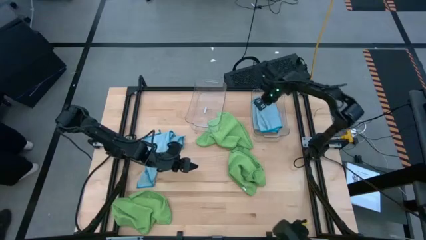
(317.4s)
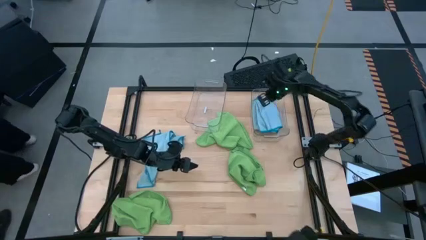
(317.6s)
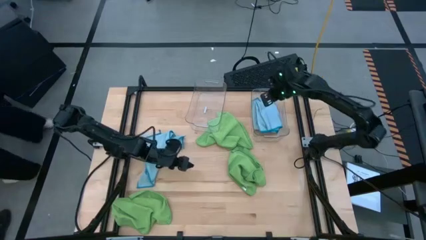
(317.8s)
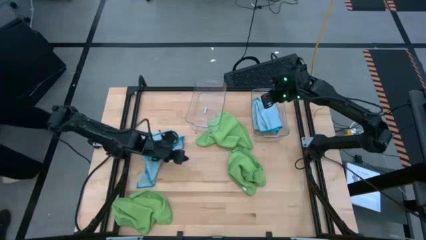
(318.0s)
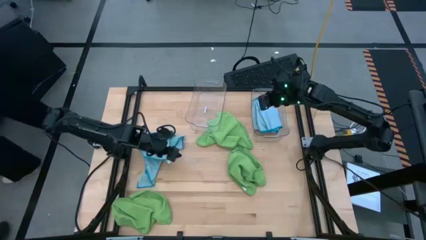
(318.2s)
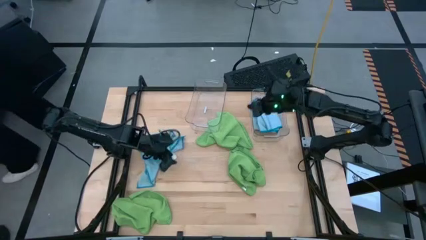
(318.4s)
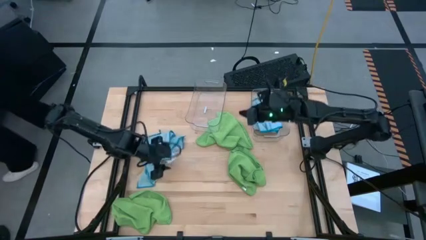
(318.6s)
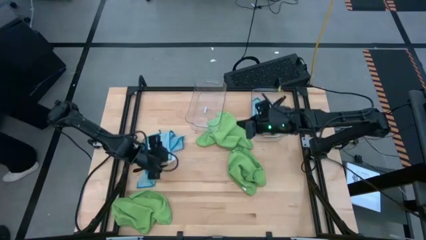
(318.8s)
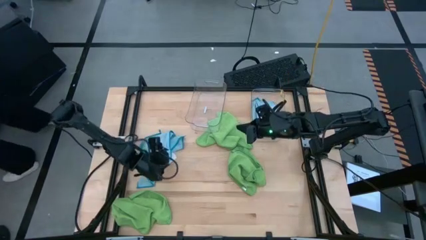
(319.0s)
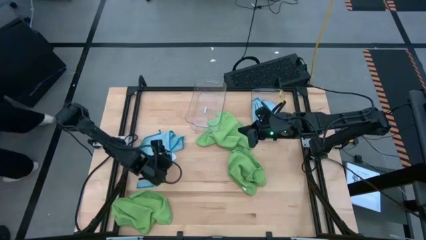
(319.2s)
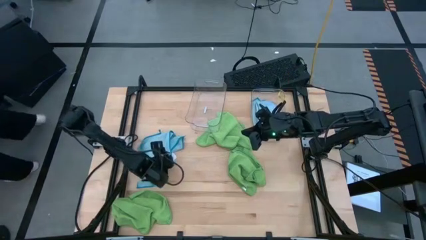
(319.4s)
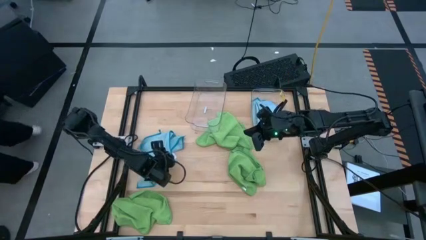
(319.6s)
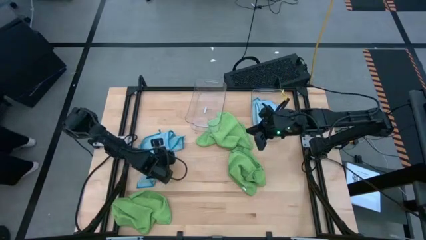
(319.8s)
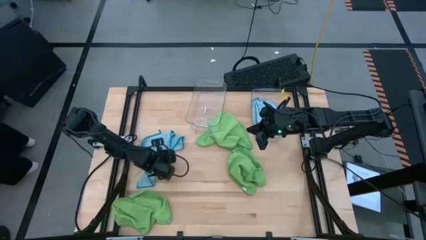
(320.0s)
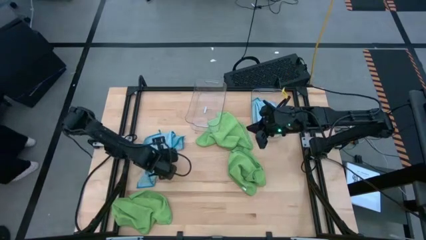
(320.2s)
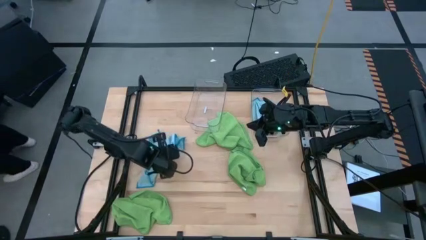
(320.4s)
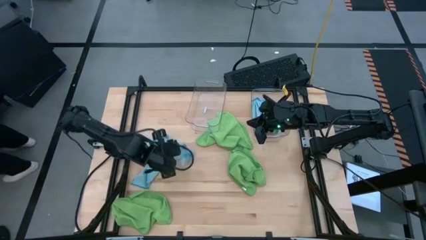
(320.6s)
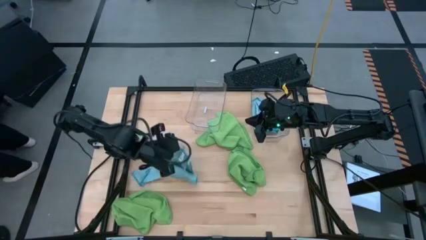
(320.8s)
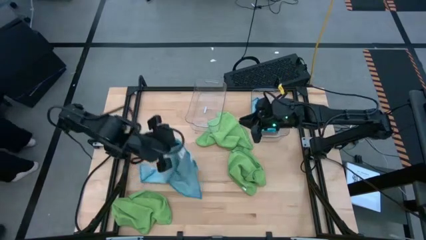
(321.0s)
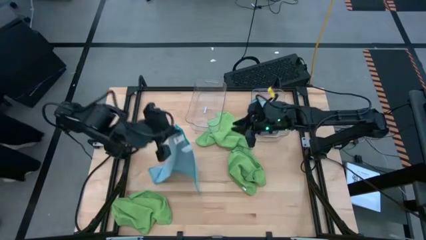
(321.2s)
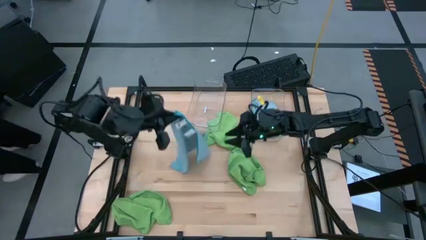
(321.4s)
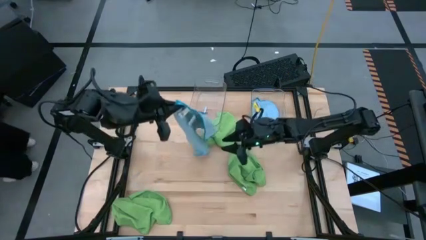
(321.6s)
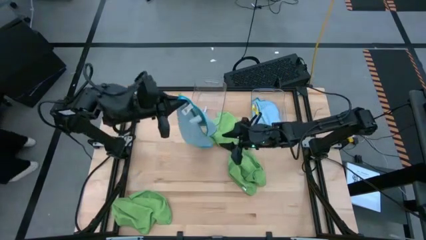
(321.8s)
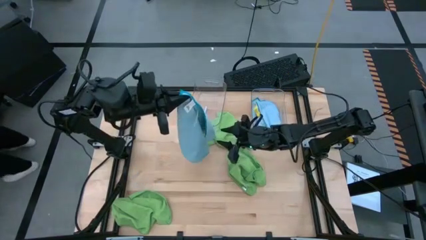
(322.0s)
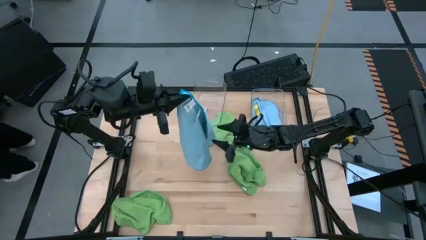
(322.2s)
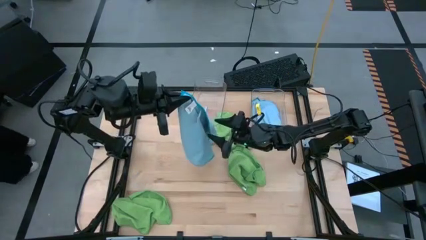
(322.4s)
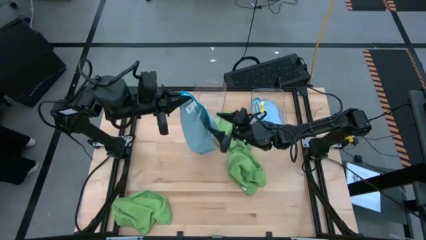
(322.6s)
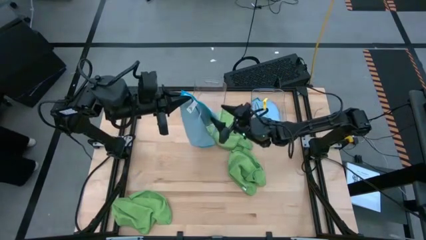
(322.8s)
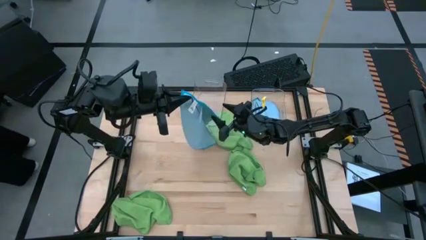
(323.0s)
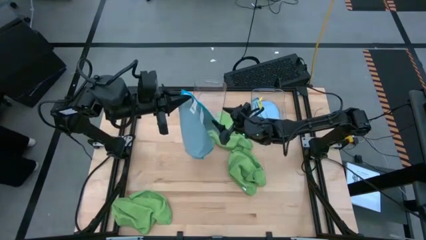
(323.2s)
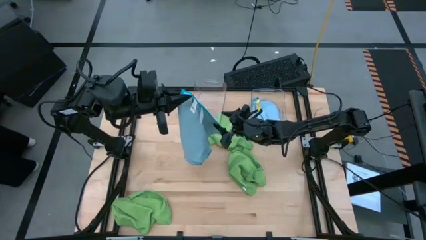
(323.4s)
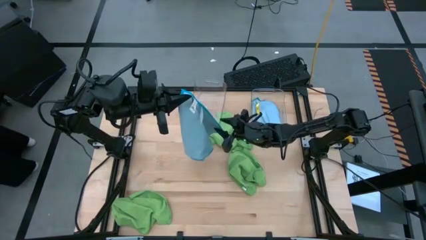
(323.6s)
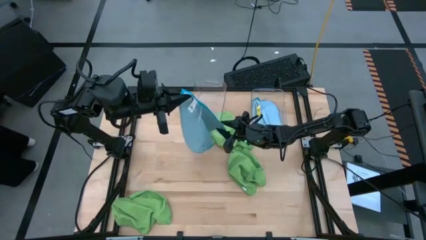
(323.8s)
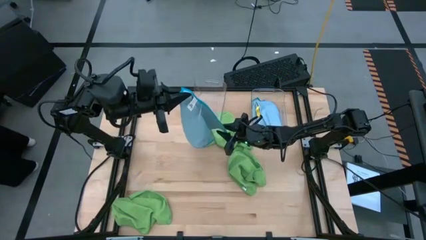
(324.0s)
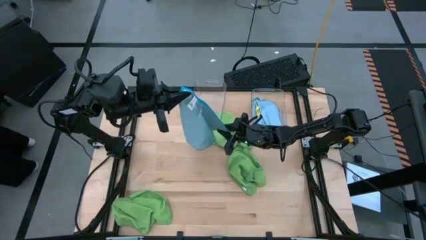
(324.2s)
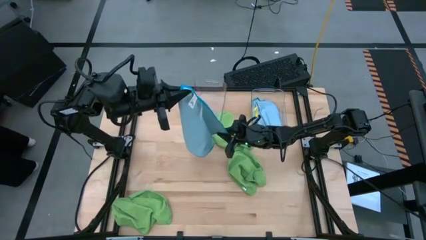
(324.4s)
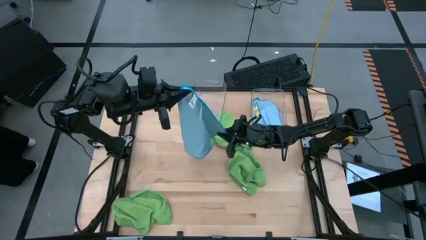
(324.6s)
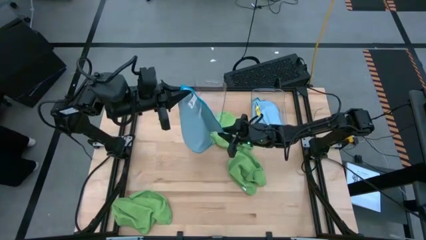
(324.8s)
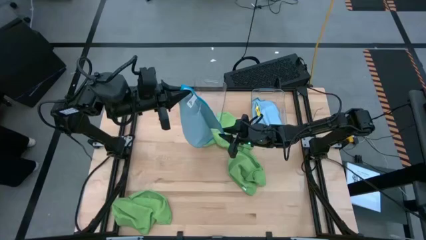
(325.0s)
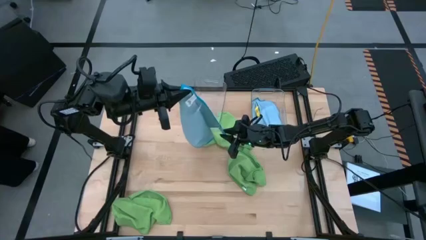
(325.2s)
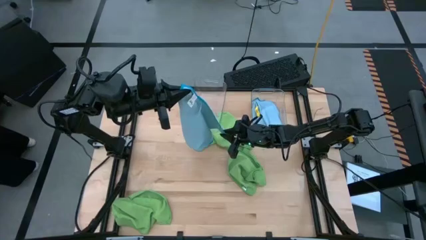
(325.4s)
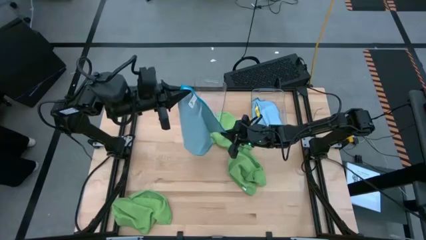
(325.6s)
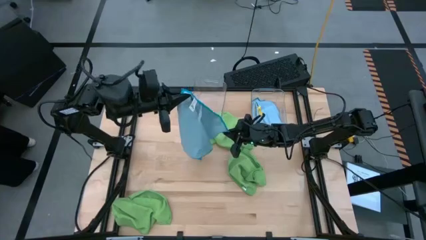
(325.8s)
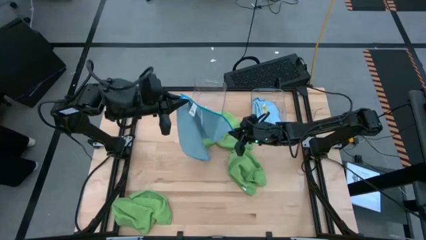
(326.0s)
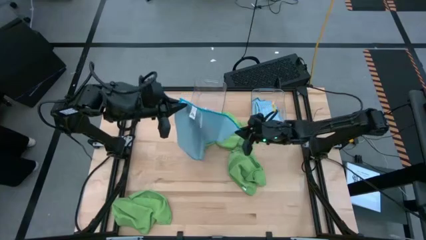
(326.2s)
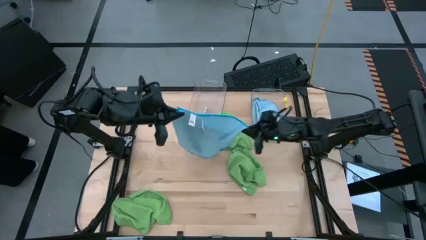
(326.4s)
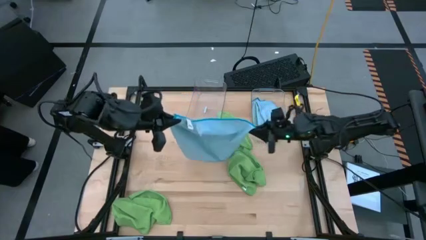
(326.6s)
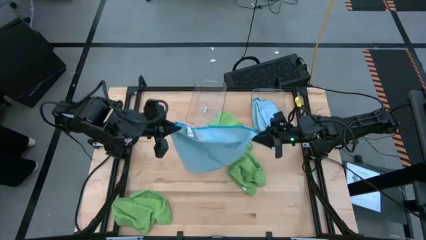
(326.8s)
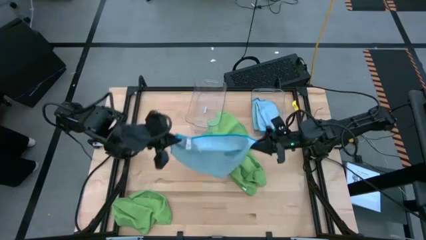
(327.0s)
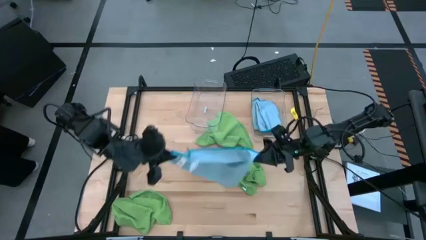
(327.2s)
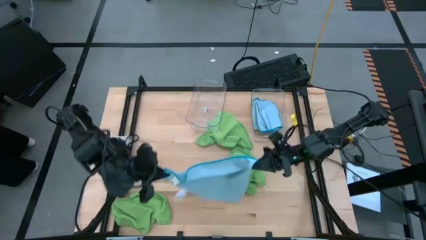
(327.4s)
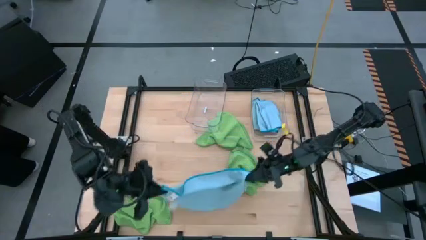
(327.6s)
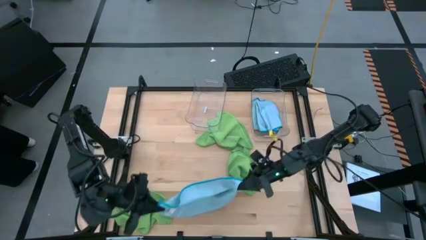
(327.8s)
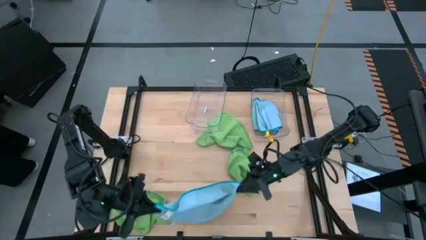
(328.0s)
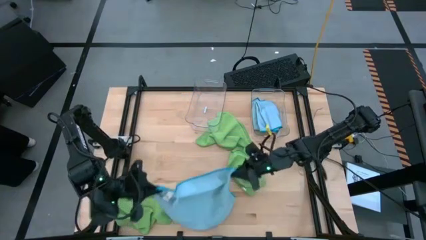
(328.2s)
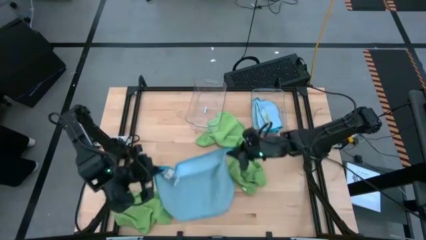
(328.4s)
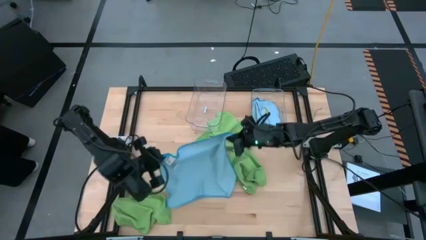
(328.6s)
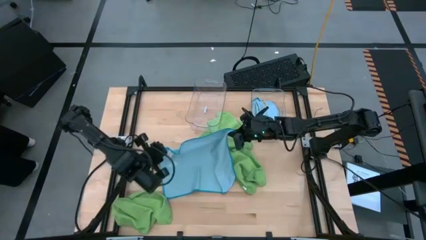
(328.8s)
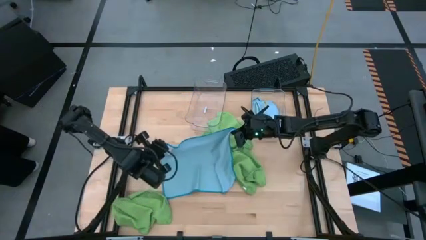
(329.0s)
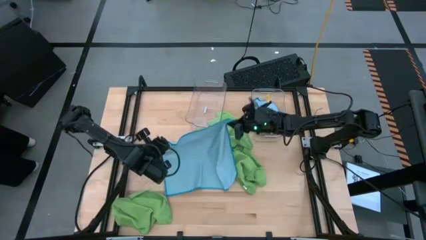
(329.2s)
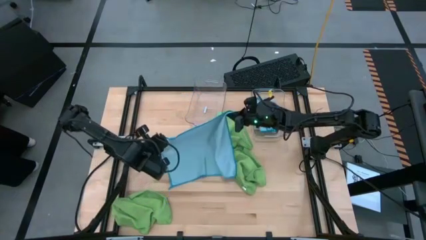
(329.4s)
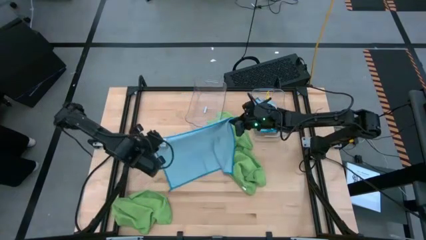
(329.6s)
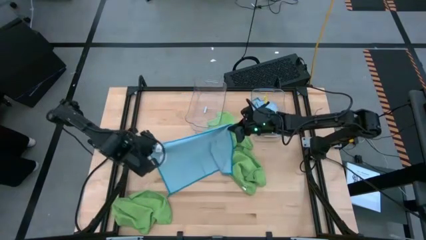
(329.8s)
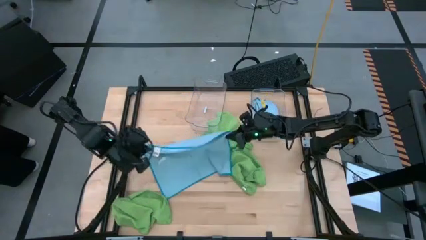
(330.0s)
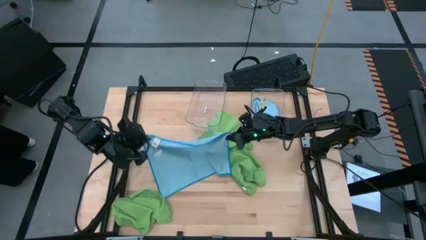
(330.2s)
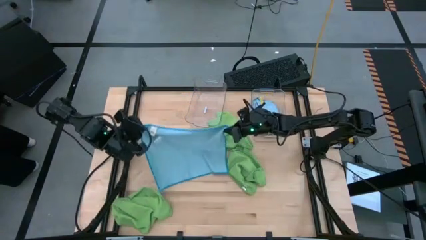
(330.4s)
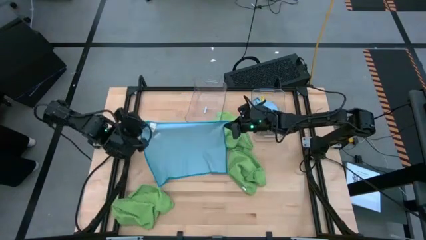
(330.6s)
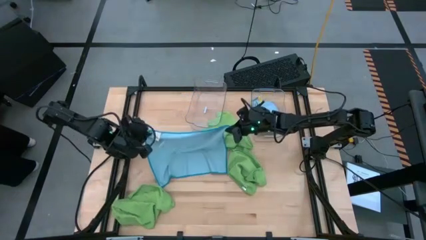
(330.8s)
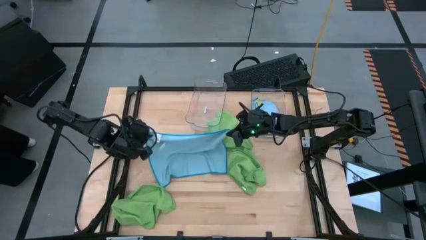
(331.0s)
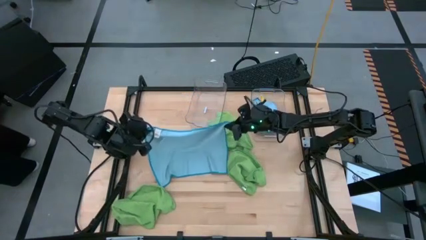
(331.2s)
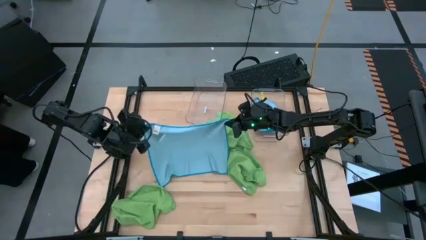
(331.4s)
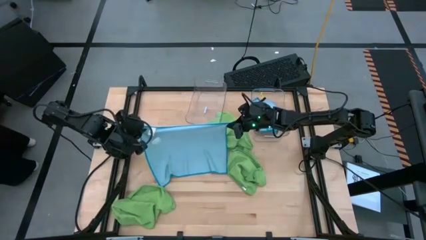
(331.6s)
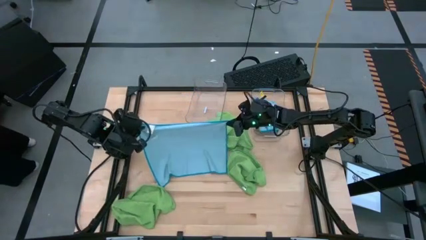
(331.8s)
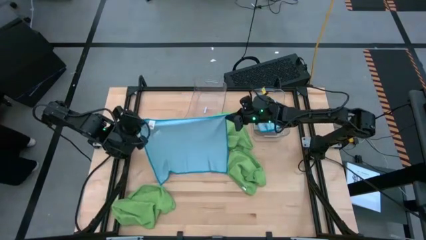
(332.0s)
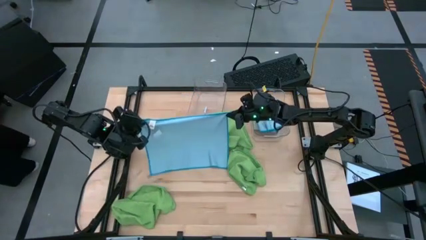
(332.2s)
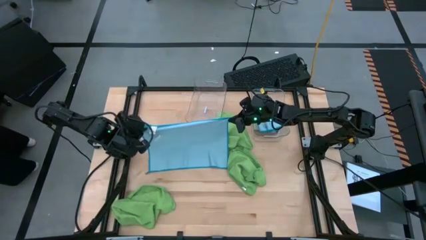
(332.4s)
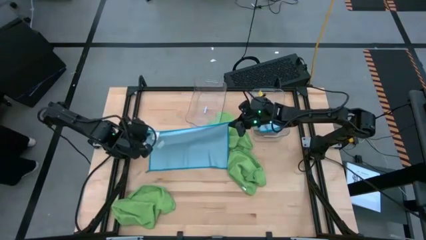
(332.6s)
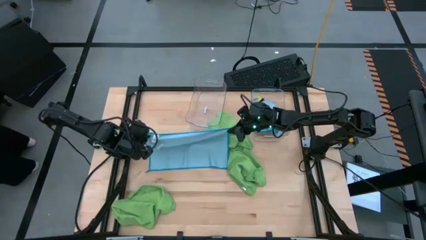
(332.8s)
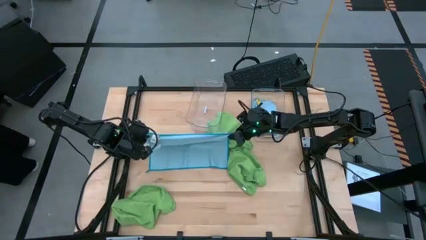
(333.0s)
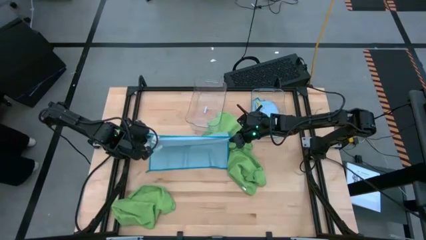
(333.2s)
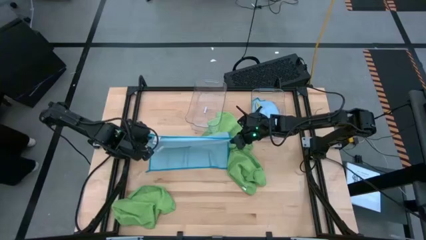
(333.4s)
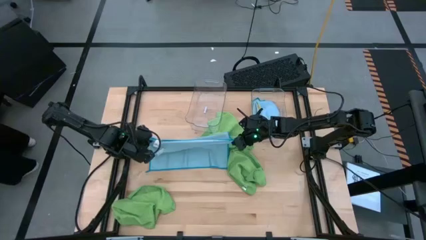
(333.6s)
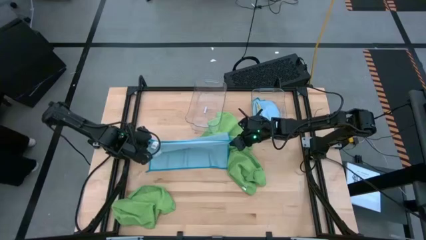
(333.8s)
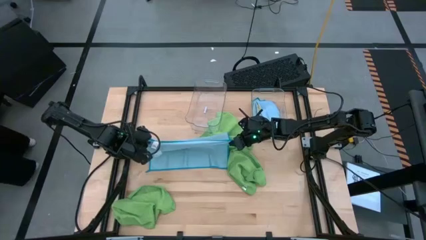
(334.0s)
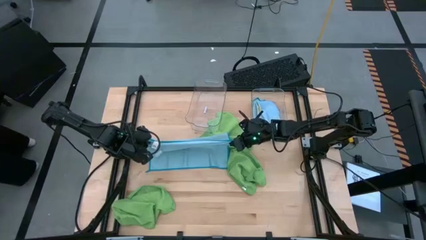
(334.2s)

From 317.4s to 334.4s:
Task: Fold microfiber towels
Fold the blue microfiber towel
